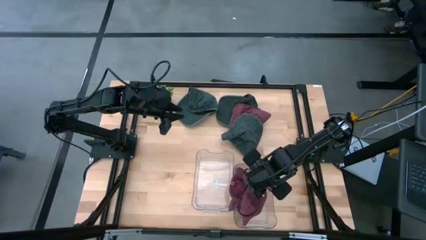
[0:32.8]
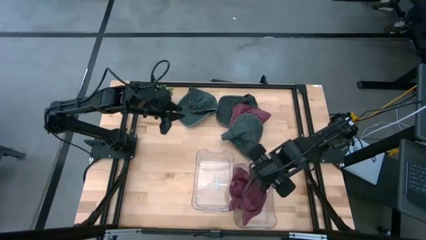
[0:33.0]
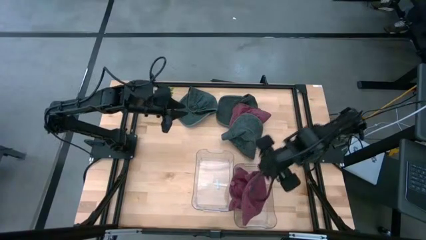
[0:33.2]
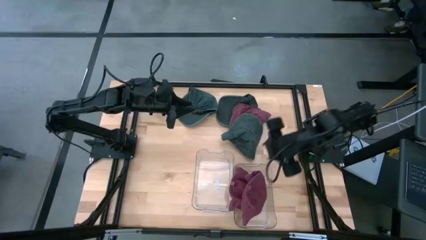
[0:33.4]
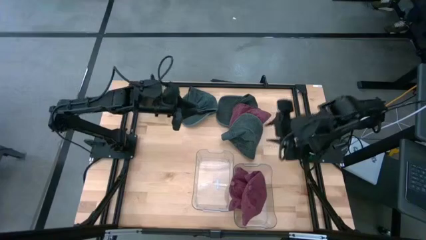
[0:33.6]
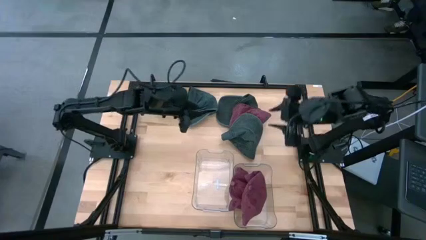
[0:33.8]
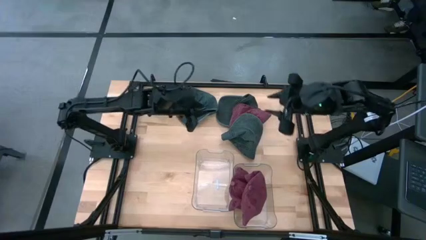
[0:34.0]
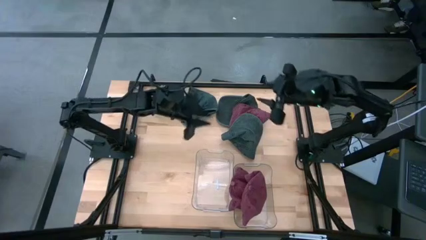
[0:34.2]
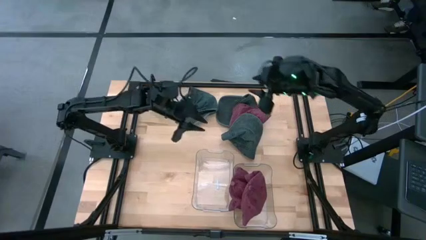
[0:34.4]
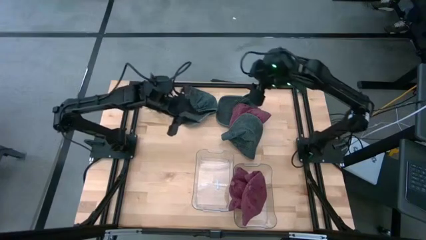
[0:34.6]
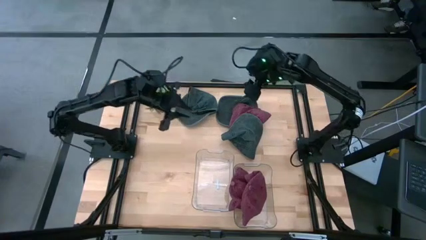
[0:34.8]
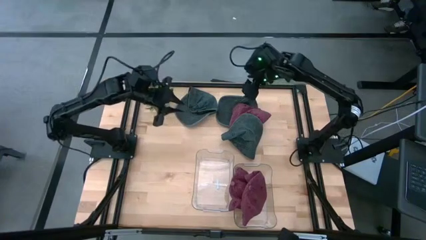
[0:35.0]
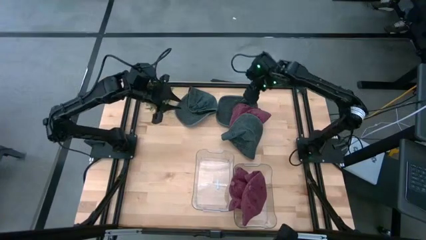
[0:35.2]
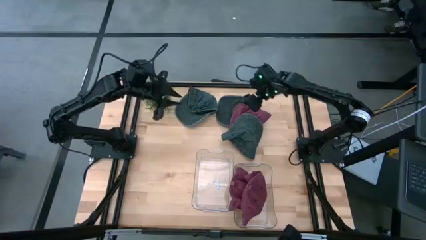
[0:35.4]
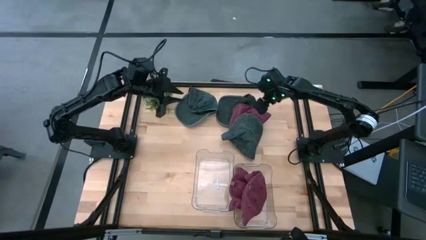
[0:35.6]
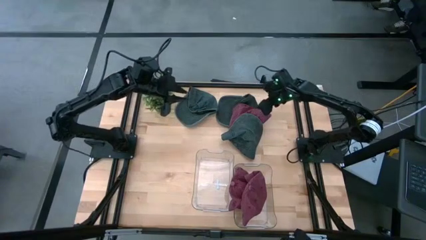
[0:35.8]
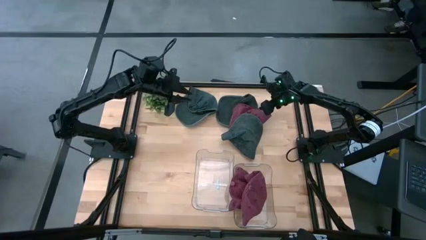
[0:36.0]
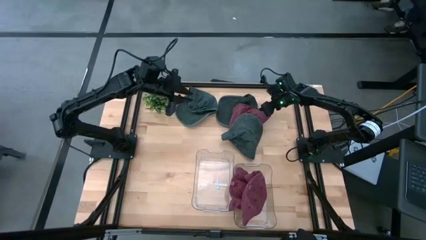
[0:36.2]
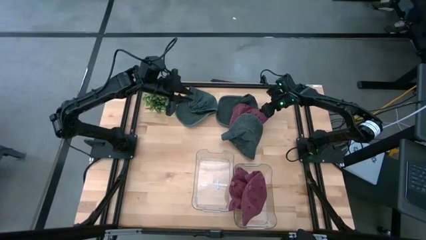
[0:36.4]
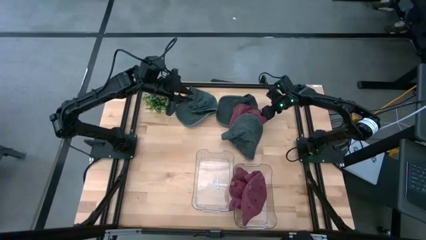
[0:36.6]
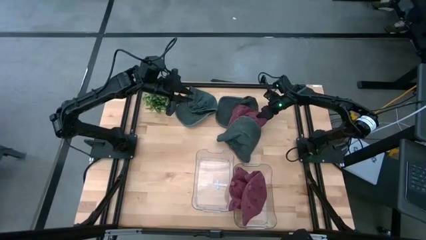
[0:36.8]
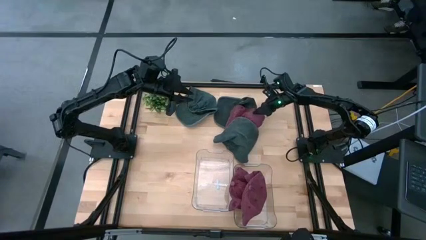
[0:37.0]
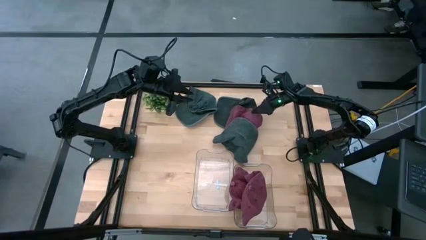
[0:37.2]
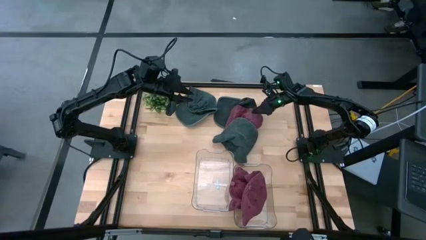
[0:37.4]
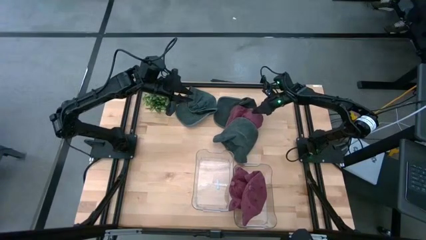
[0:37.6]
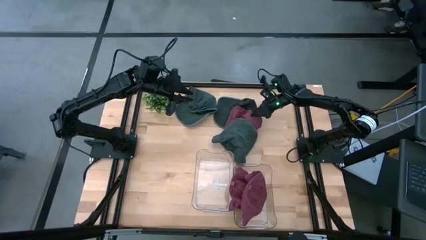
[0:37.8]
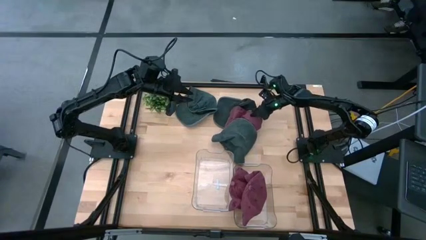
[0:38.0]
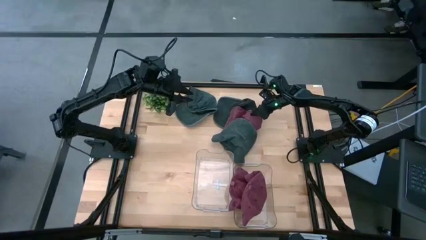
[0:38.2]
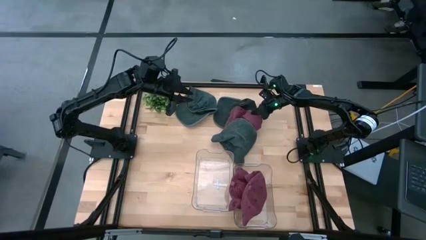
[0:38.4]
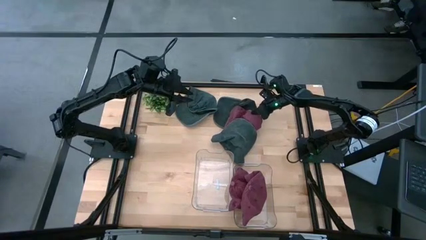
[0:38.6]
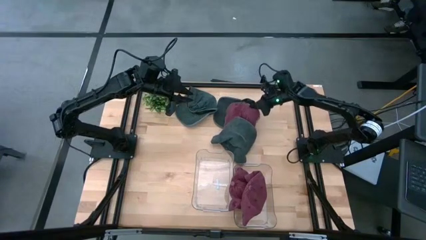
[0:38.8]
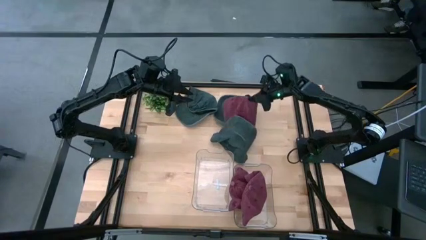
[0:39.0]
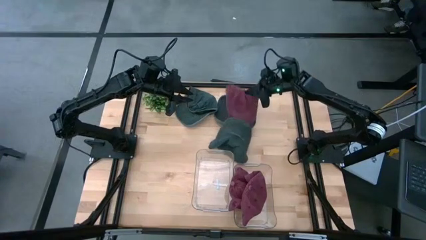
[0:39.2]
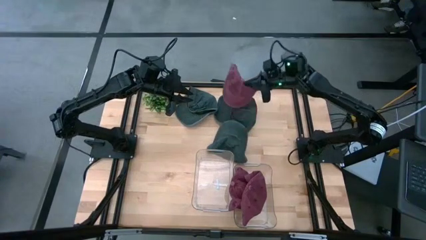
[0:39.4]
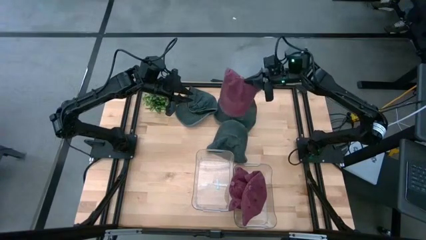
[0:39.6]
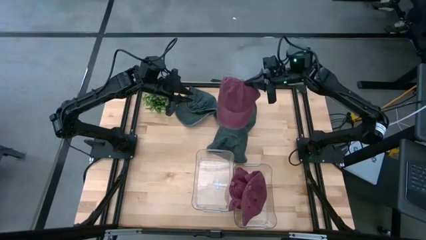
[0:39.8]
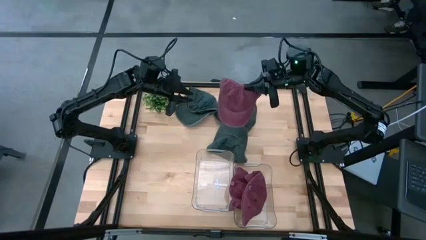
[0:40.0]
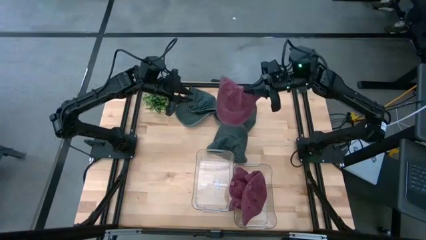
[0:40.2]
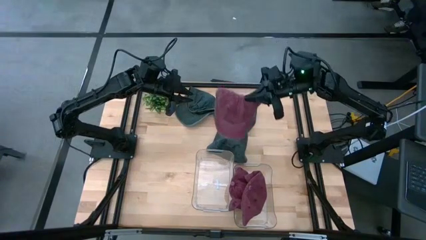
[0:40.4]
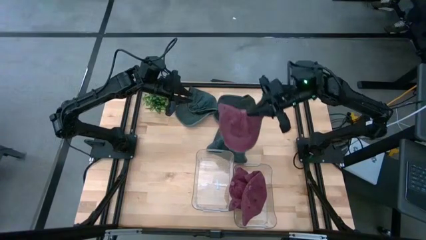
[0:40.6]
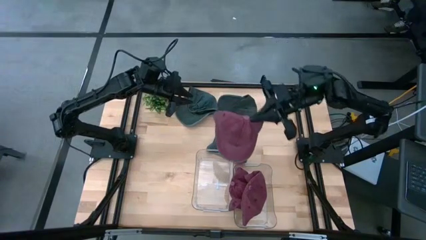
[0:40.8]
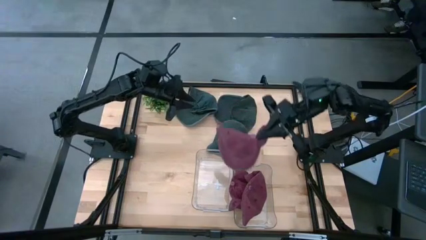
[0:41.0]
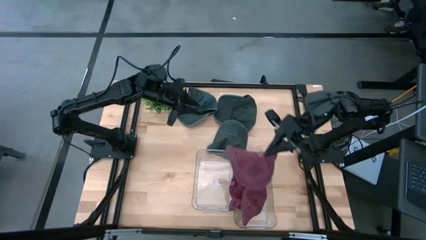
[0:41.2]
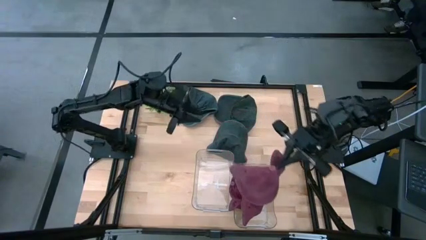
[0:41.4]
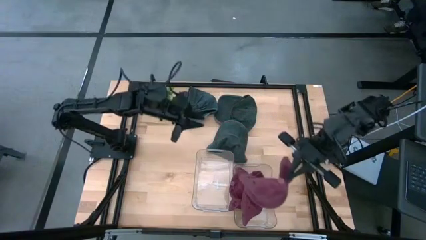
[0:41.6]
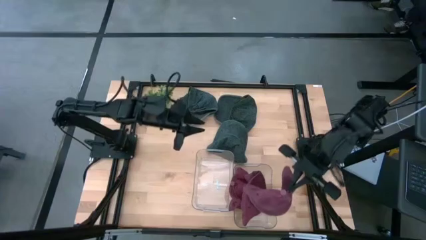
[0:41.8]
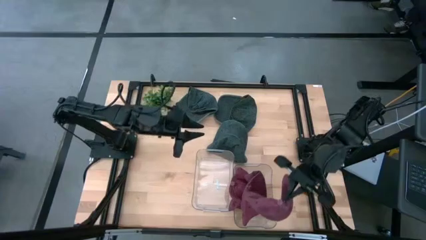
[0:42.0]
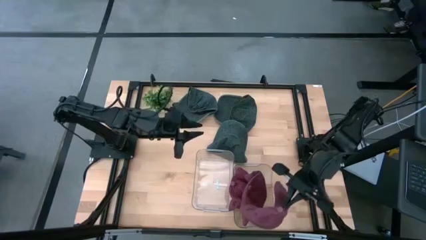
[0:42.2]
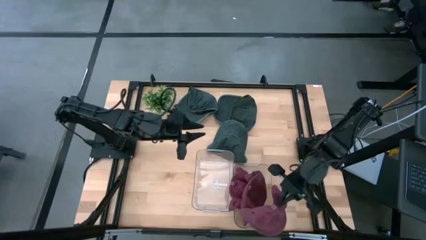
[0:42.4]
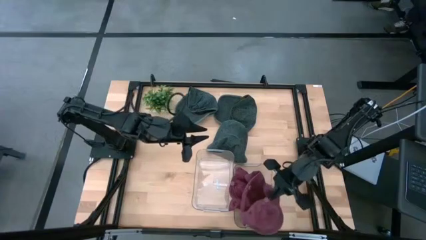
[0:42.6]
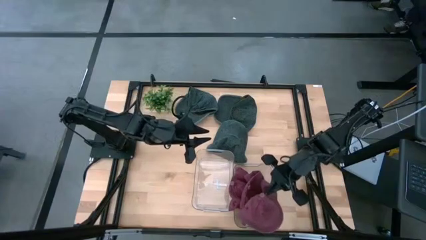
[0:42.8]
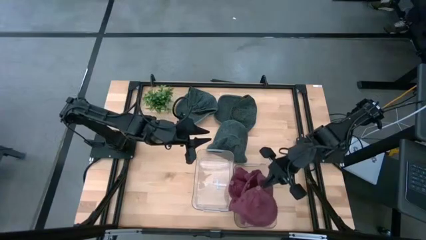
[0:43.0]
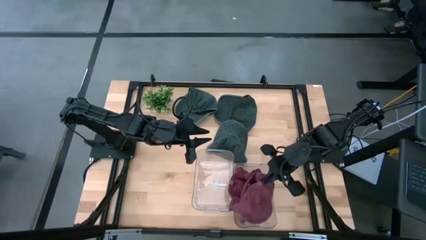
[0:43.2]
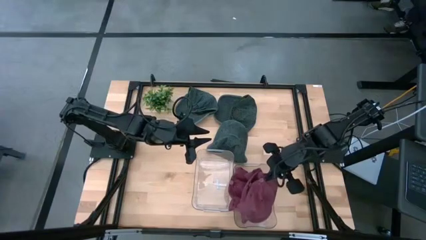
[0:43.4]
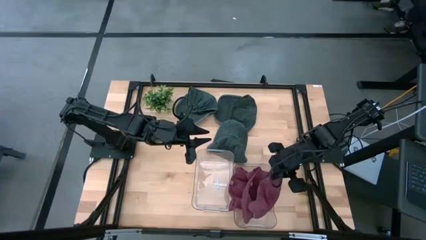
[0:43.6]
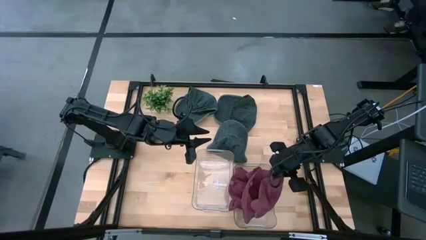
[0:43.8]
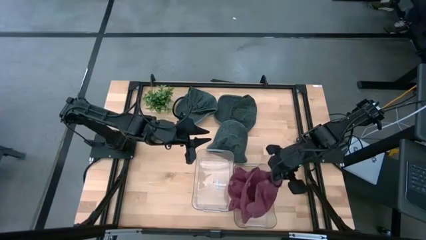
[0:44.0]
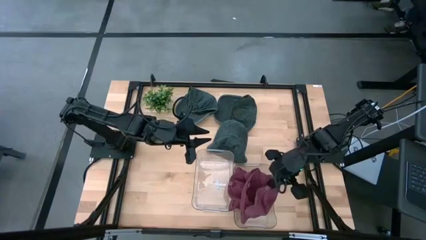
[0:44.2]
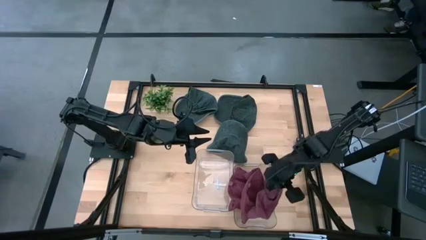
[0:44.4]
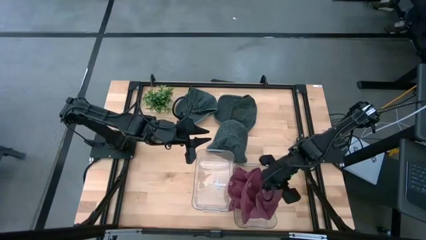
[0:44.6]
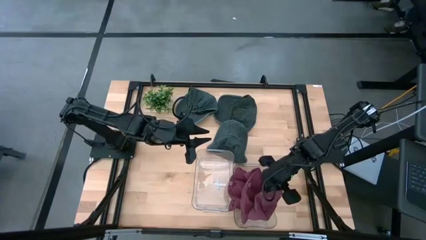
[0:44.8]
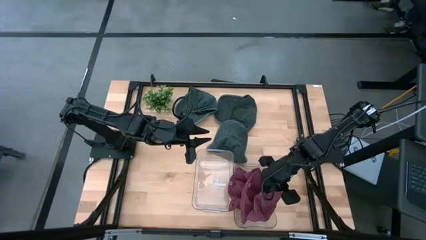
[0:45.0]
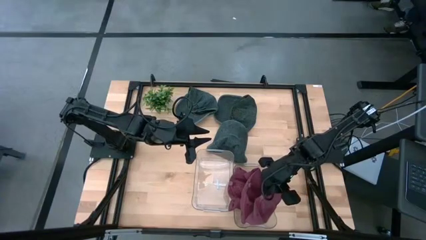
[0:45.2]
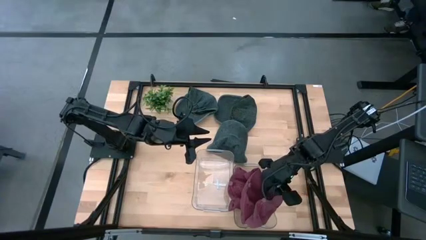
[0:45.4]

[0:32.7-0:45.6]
Task: Pick & Place hat
Put the red cap into the right transparent bin

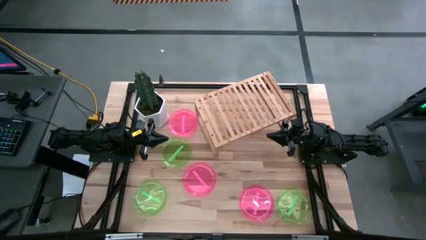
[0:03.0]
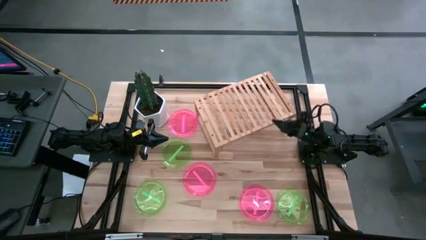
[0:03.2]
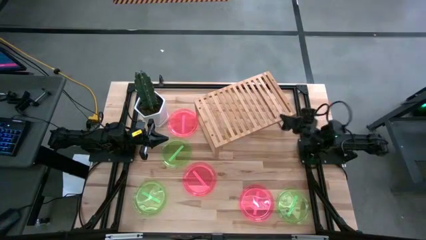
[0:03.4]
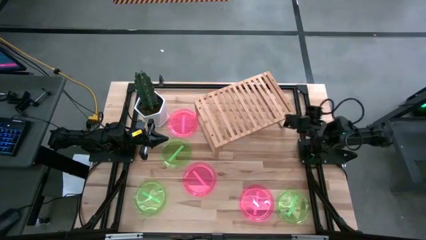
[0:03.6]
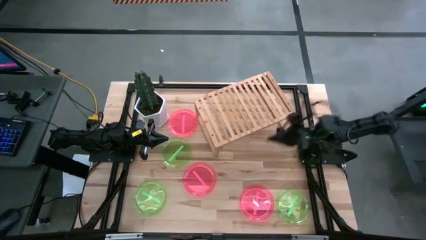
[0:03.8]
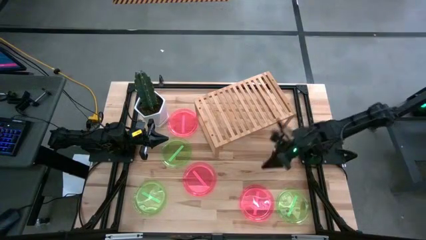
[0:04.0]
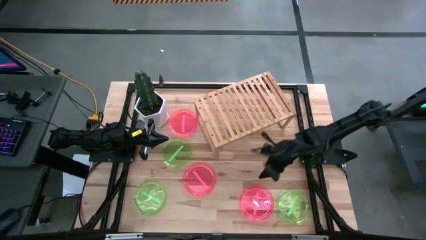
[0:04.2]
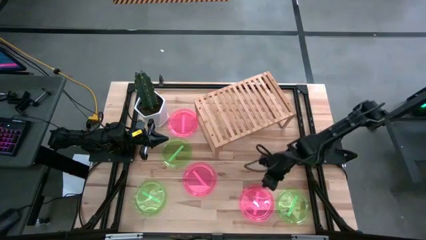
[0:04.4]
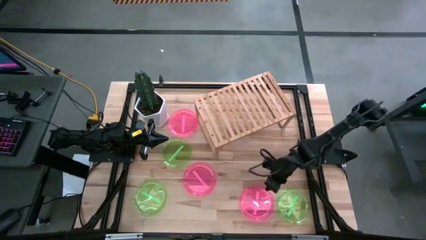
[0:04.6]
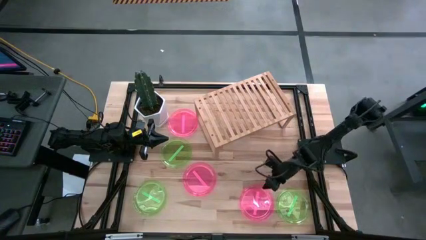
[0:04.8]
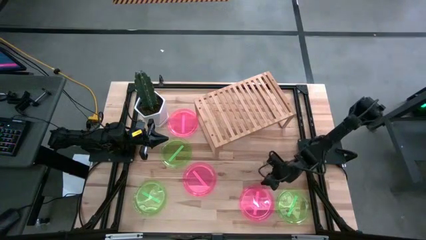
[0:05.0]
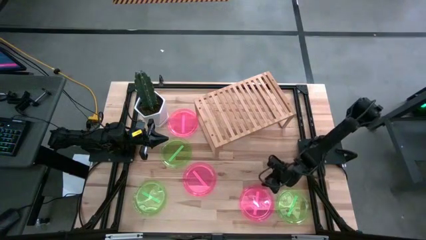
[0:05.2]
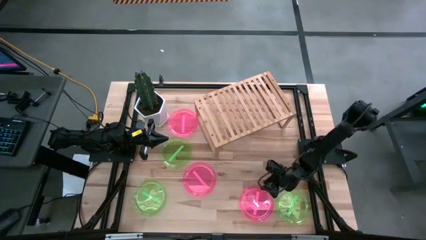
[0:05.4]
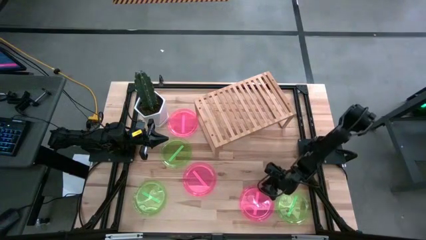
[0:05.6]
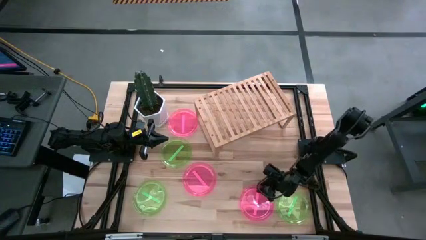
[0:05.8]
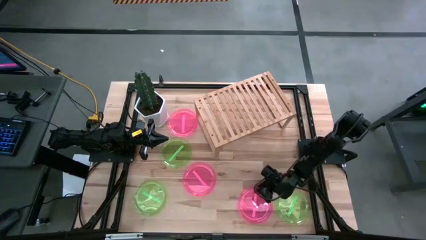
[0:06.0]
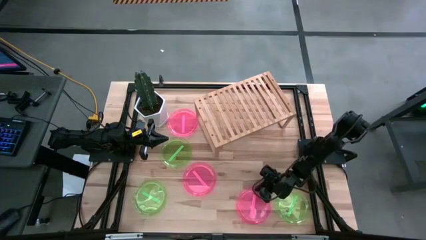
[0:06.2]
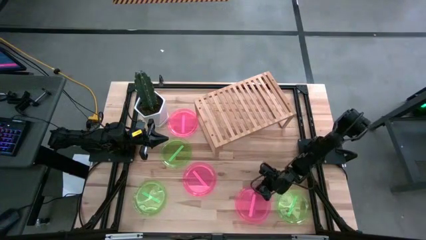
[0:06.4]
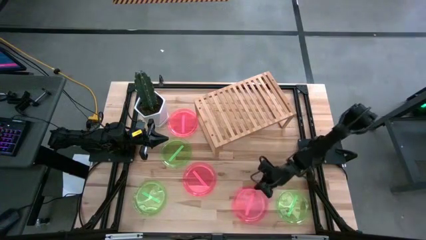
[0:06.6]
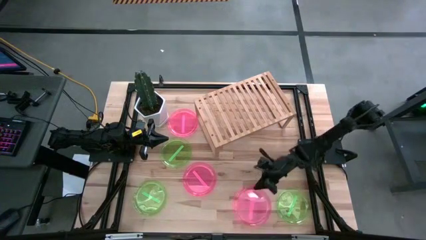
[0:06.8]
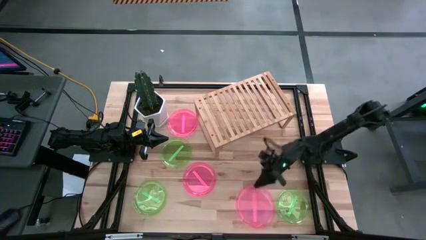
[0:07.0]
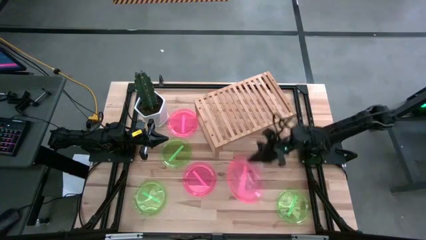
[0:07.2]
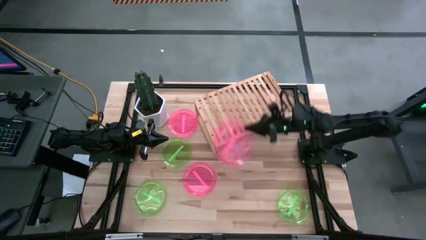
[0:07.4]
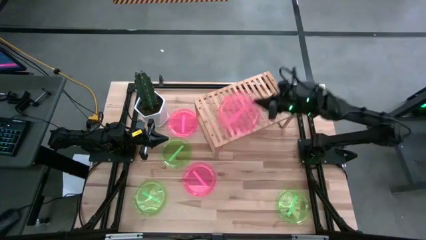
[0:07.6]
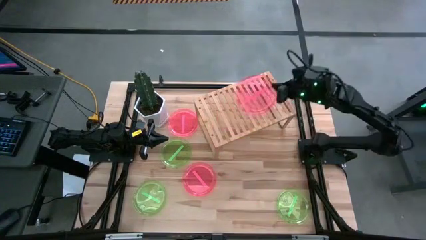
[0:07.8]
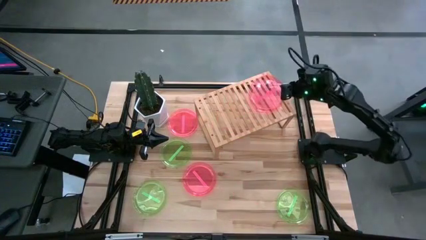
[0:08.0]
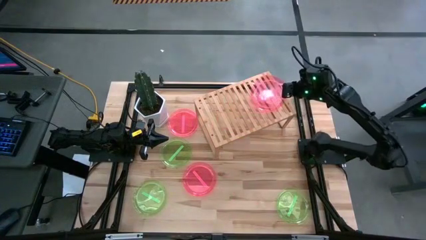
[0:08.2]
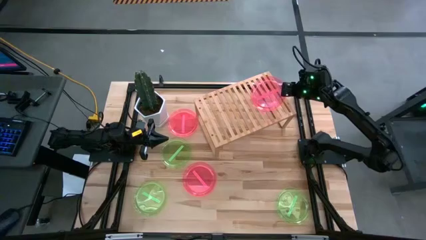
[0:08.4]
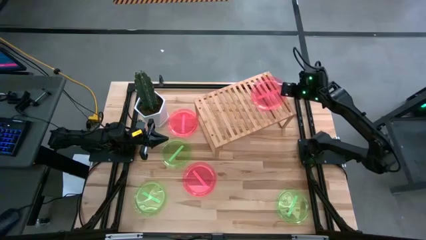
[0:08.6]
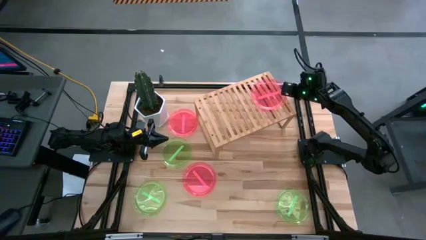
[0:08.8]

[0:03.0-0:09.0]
Task: Place and stack plates onto a shelf
Put the bottom pink plate on the shelf
